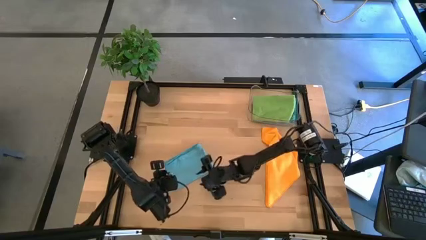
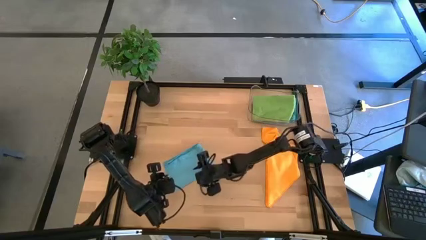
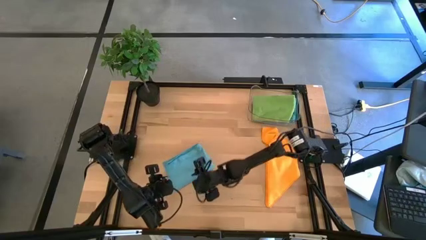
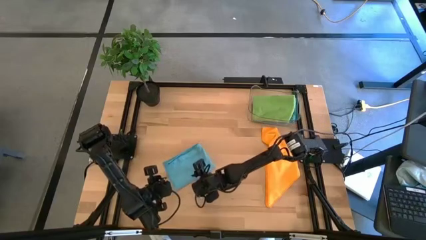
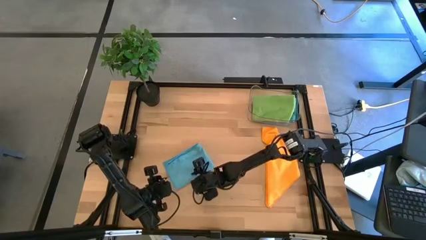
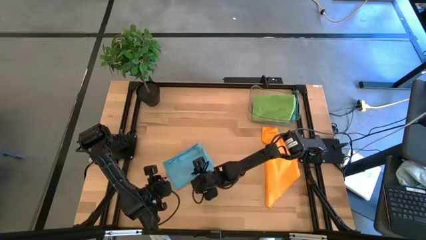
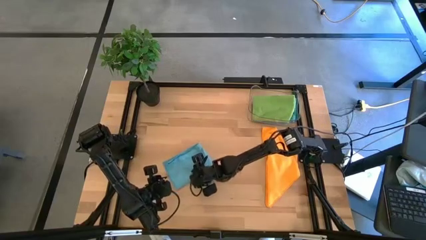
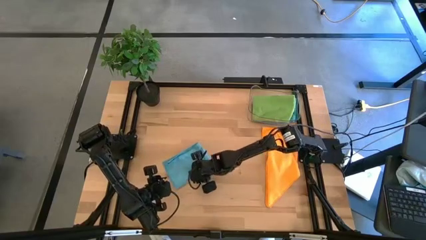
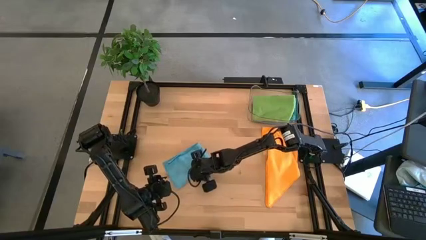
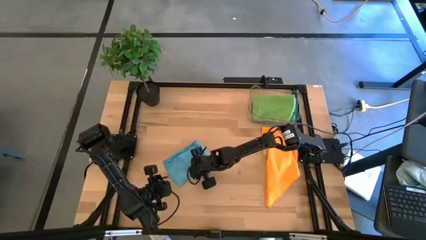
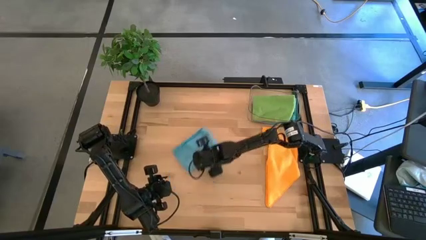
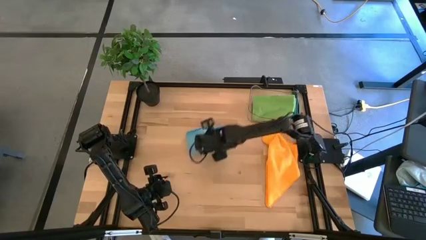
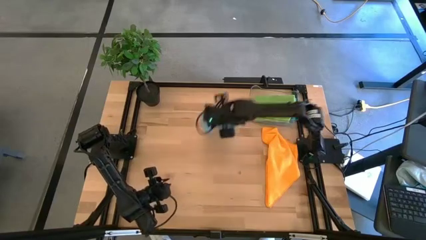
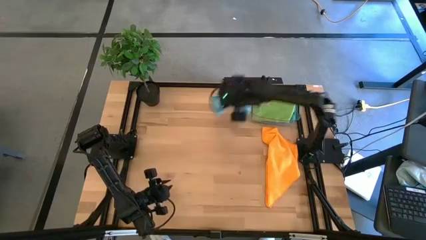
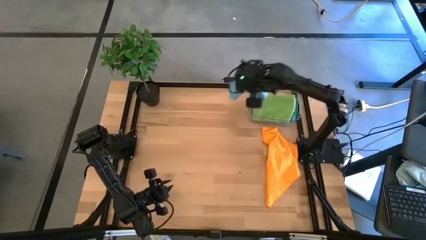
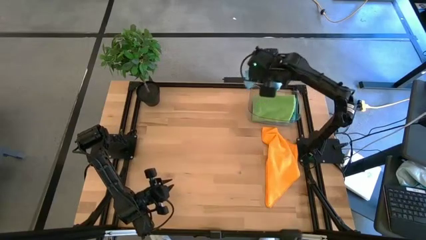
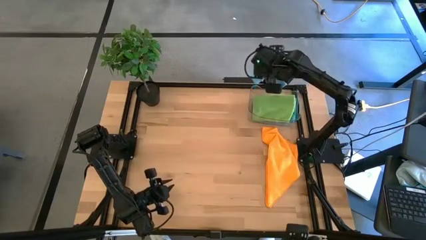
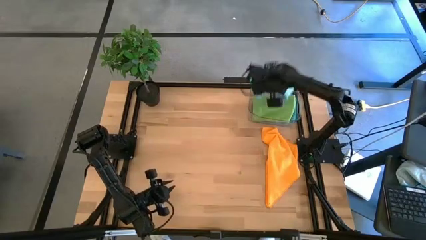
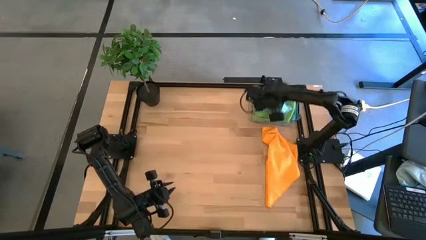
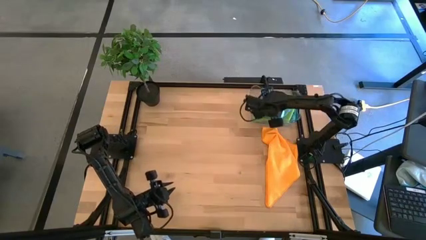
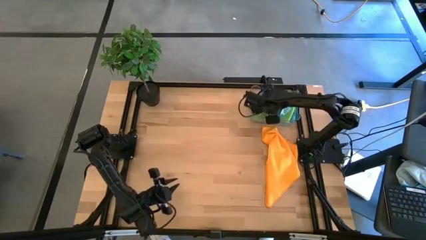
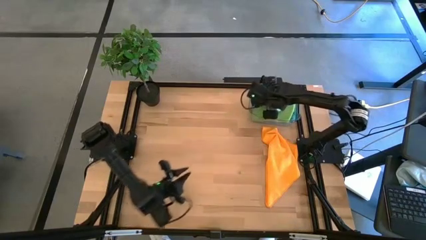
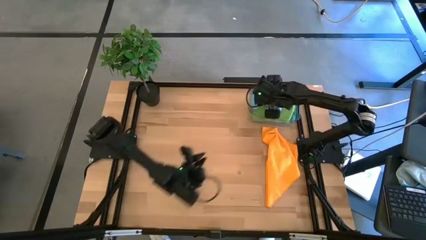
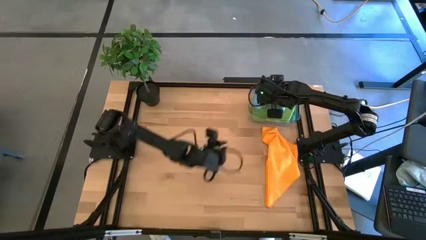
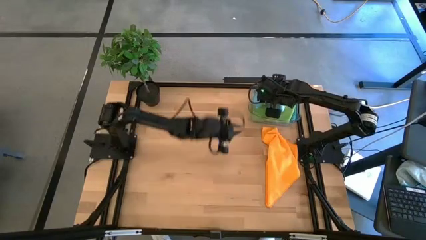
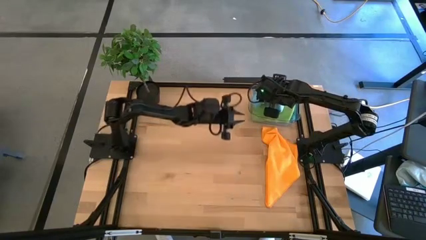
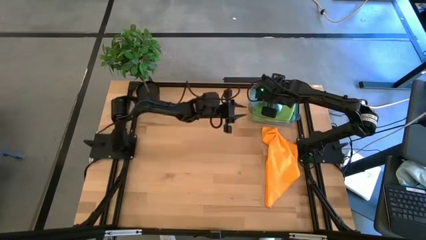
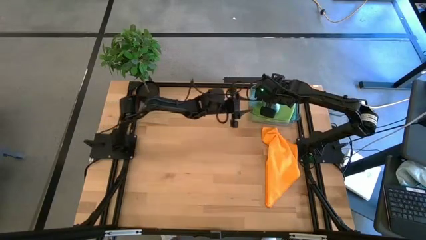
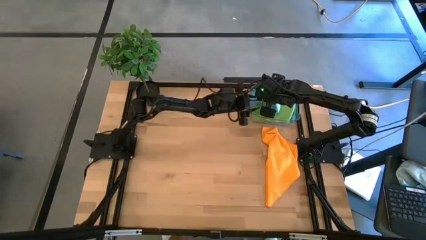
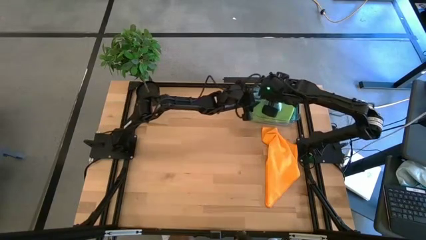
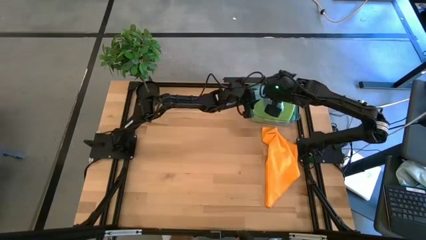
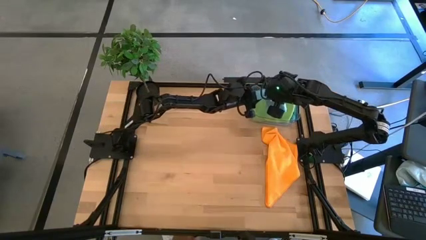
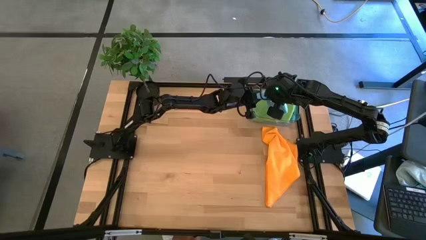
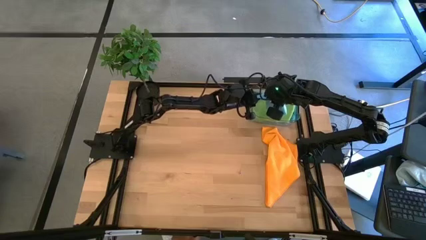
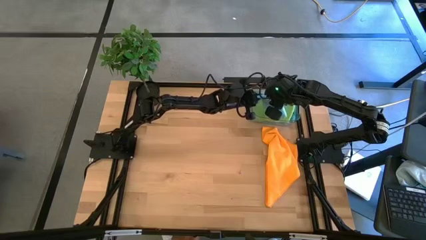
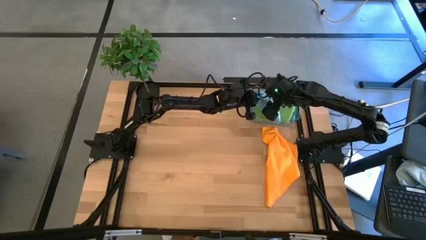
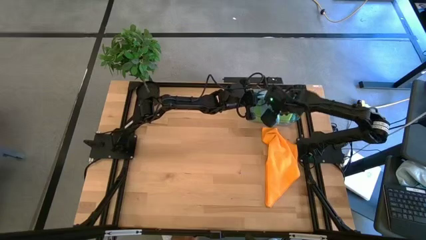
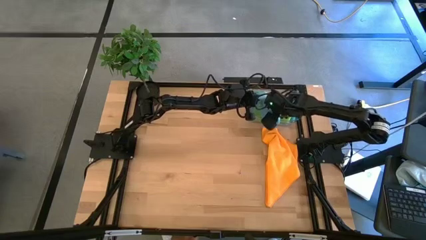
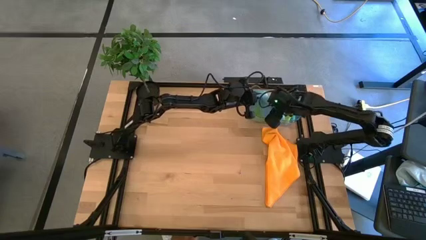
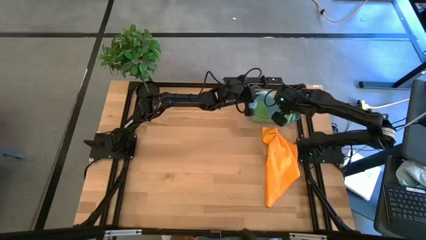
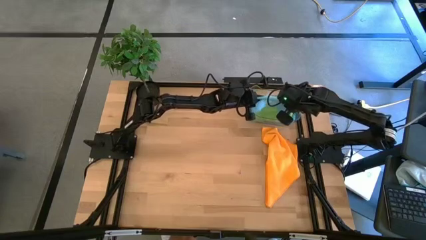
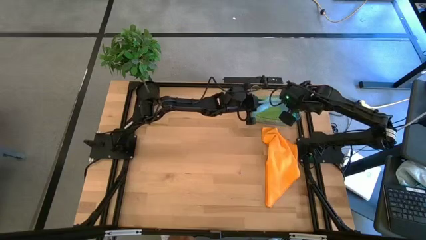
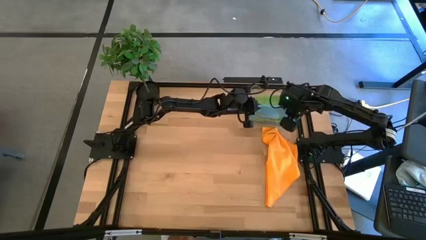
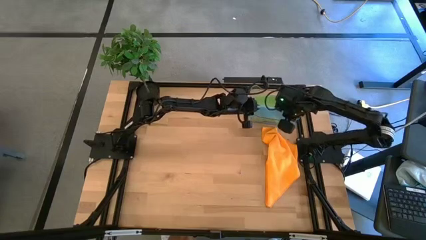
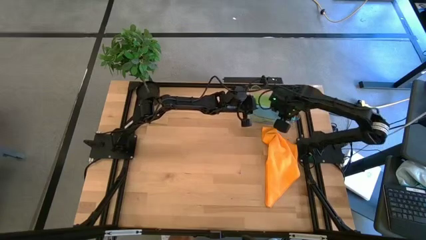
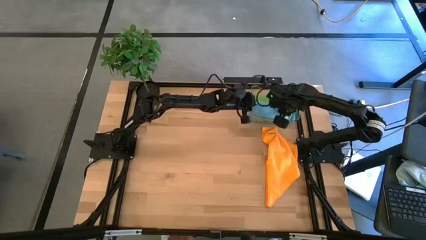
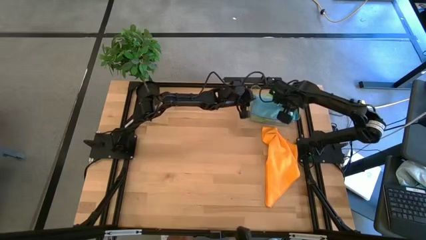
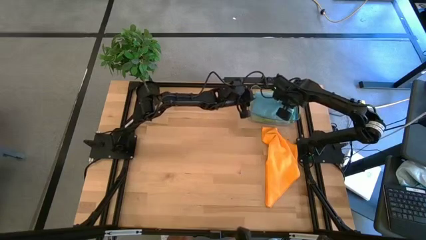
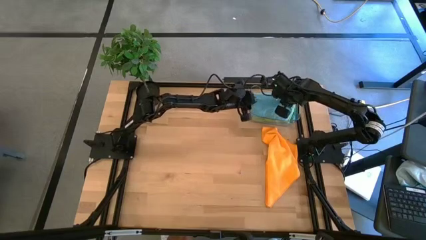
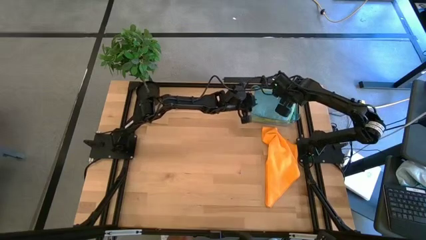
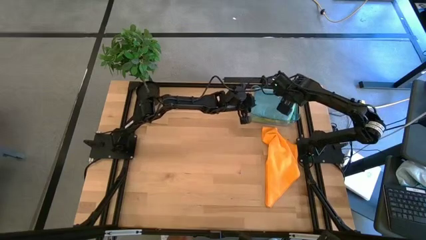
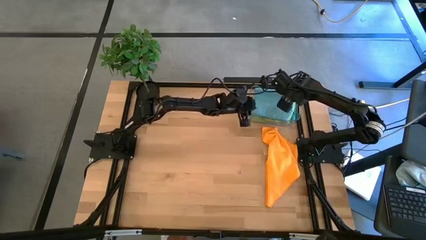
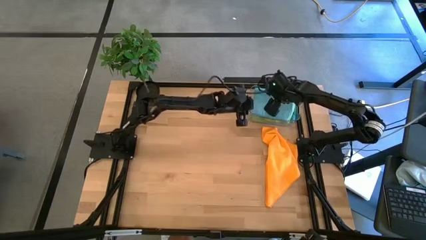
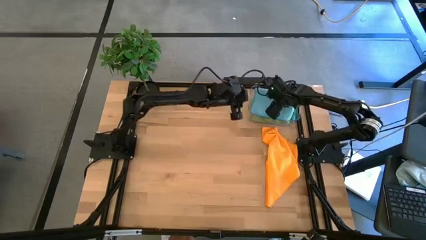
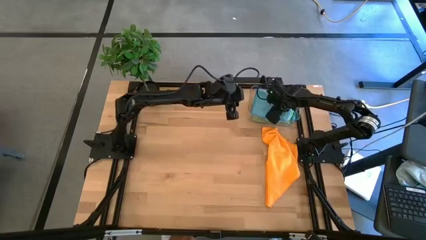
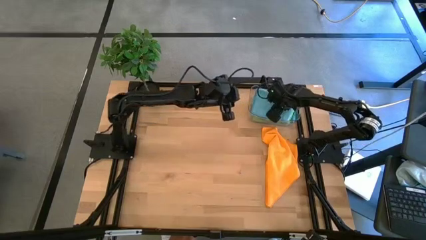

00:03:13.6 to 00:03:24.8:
Task: Fold microfiber towels
Put the folded light blue microfiber towel into the transparent bin

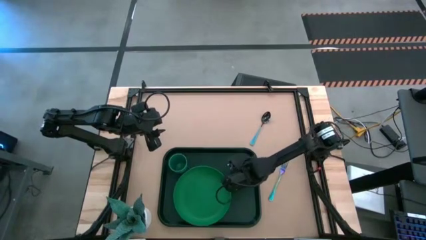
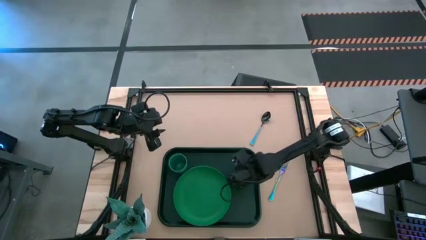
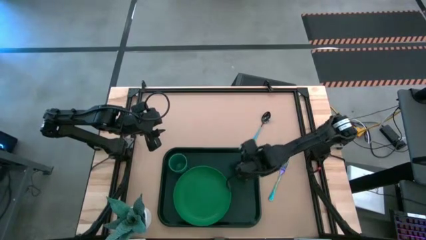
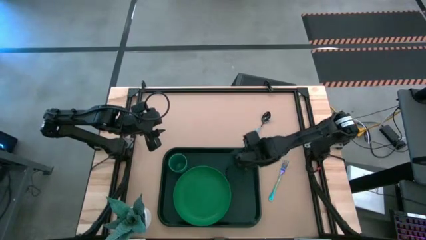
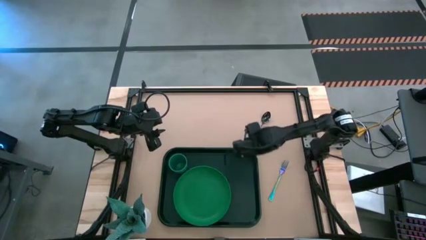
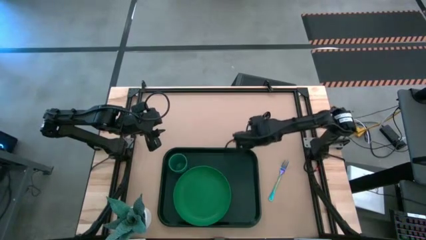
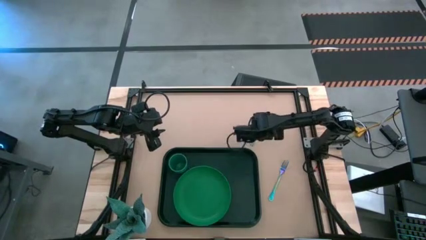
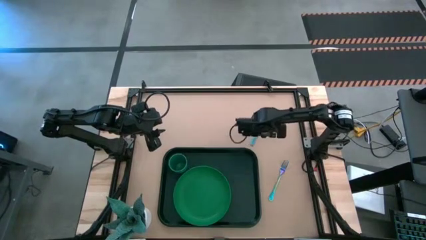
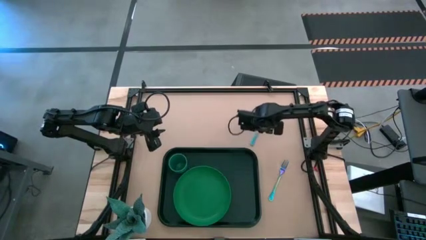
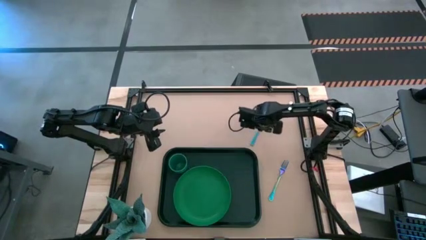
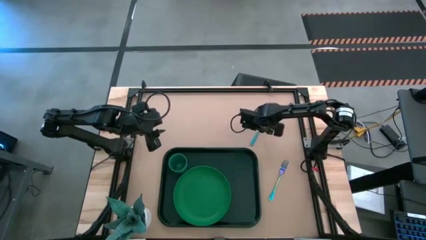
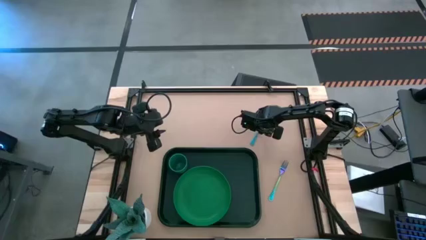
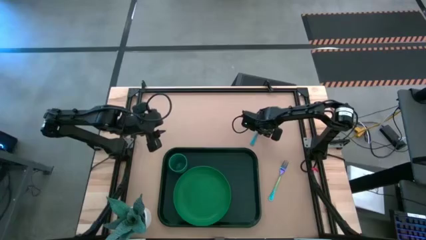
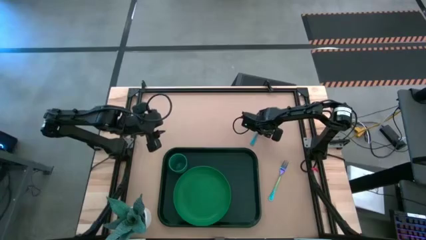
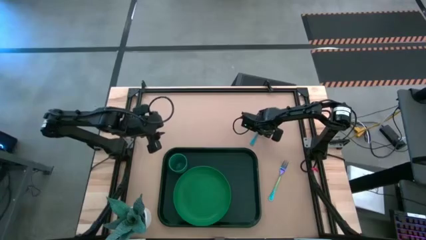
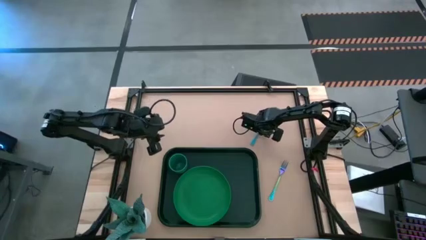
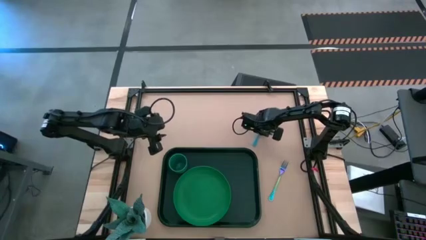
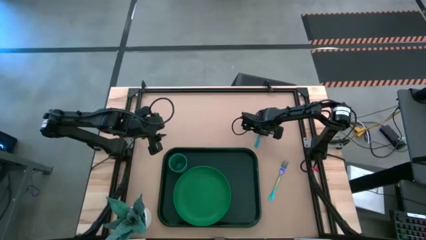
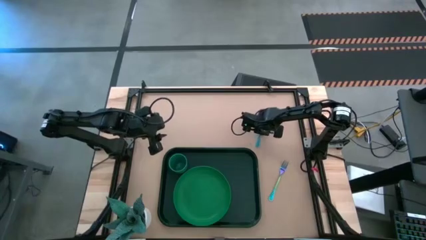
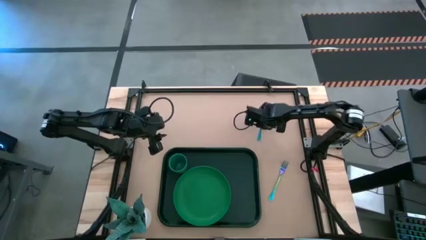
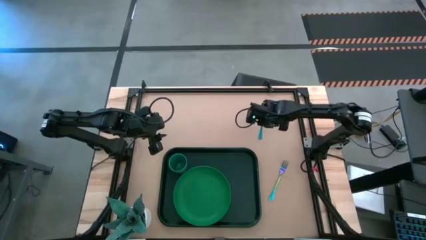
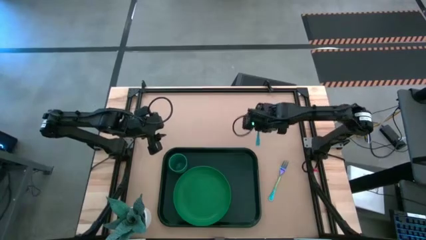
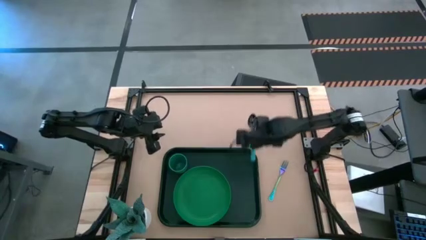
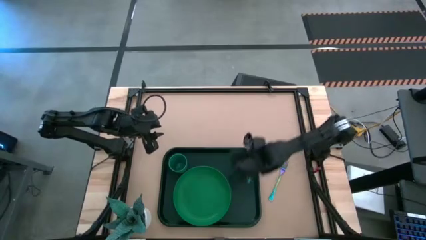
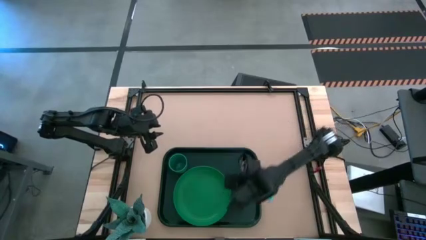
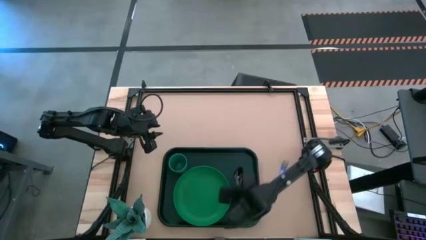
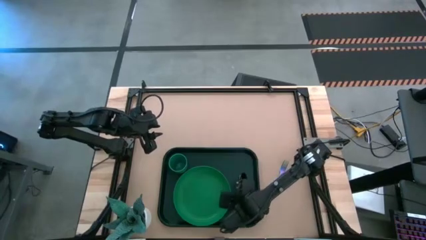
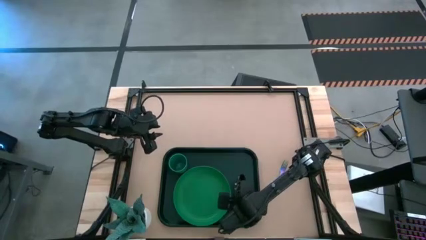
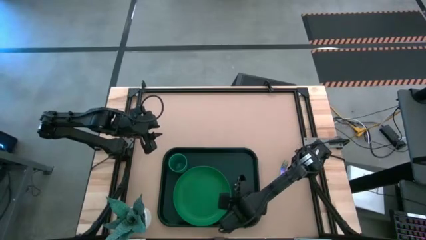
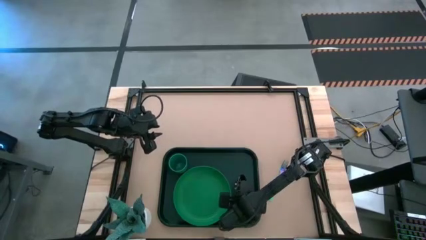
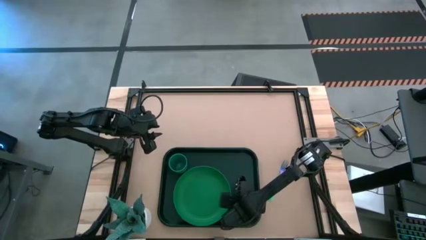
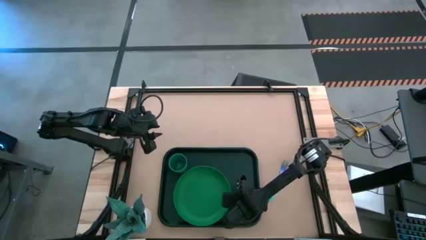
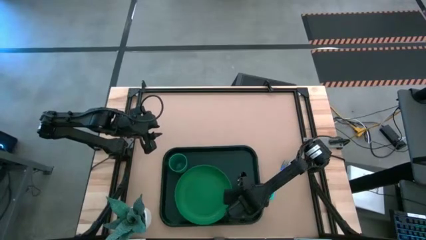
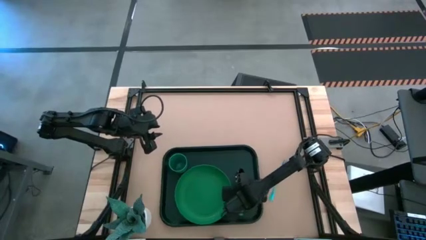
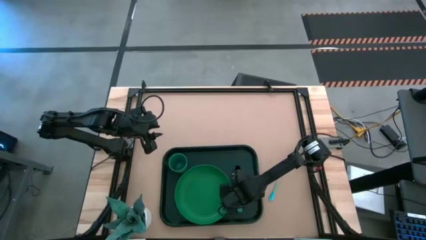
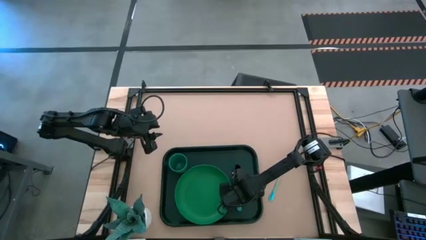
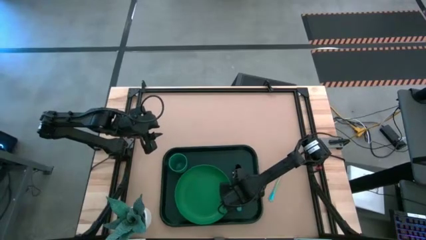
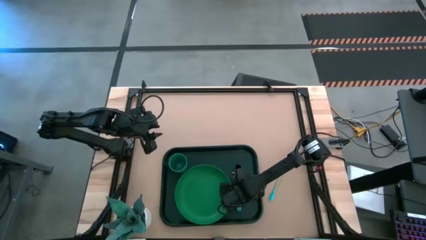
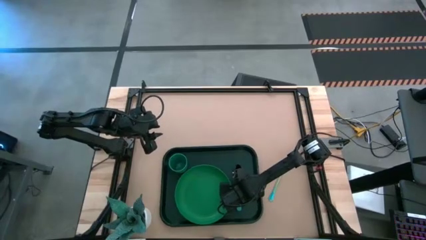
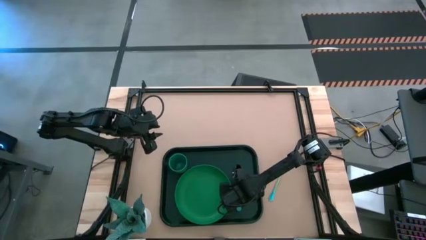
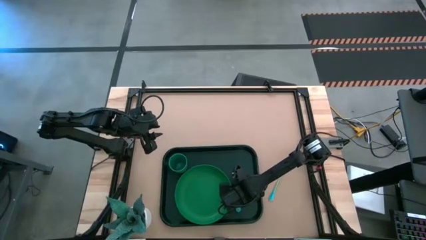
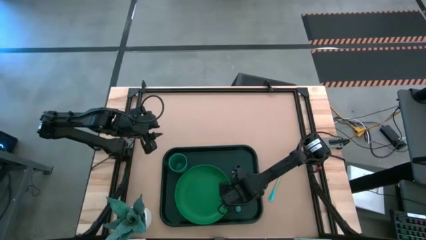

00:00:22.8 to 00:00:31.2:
Task: Pick and place plate/cup/fork/spoon on tray
Put the blue spoon on the dark green tray
